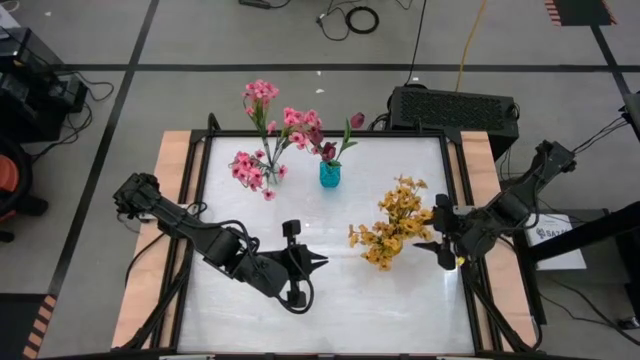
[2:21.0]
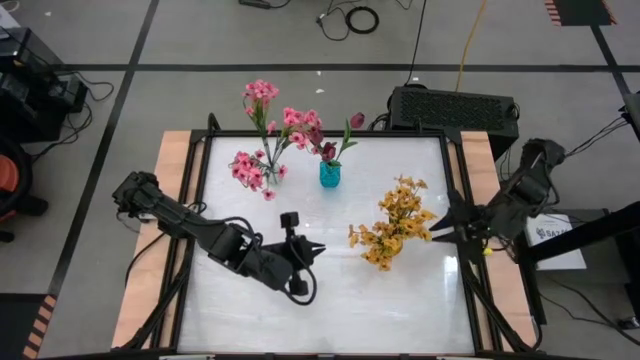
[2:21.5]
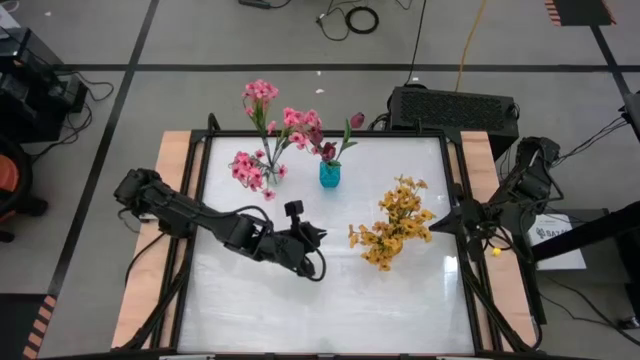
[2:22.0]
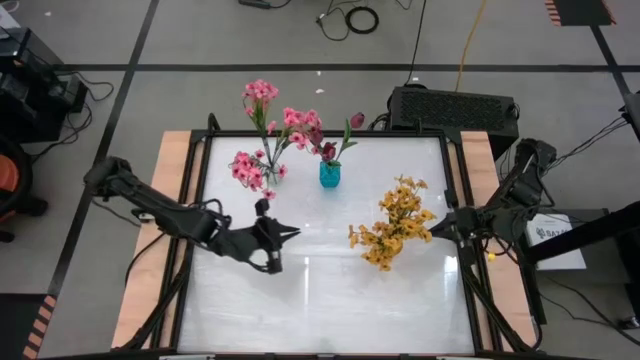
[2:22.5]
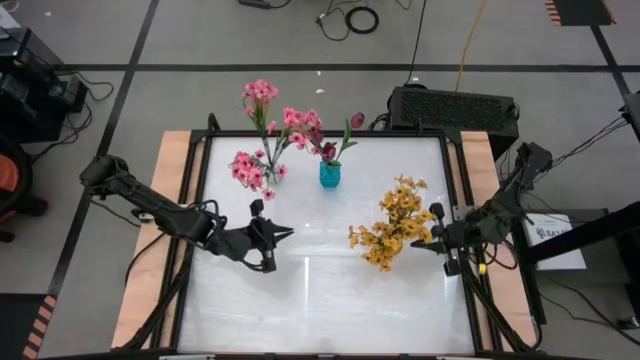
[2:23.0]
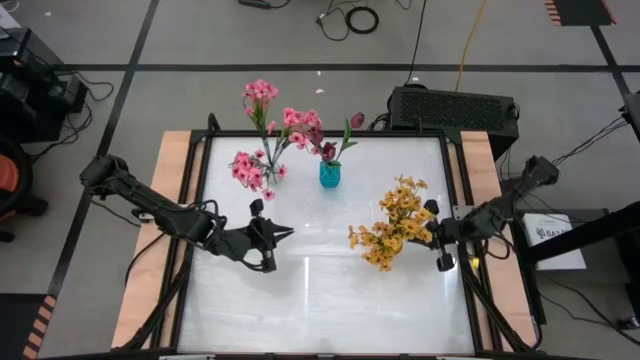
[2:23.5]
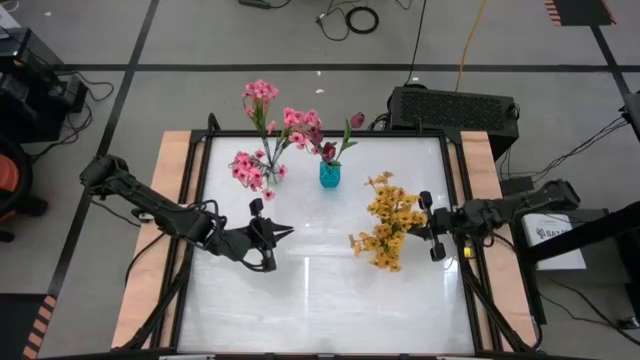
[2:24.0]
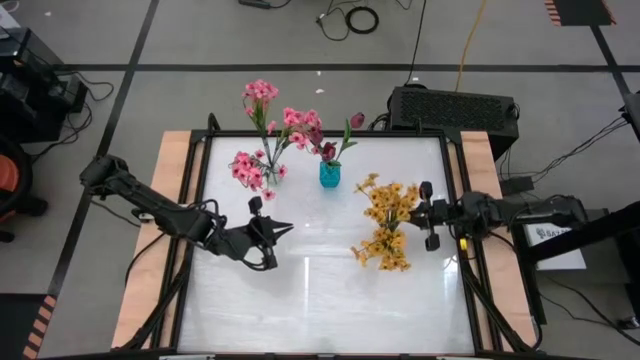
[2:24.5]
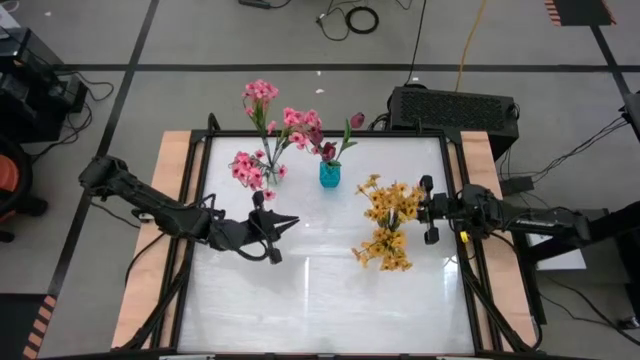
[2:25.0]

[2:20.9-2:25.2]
Task: Sort flowers into vase by color
Adjust the yellow vase

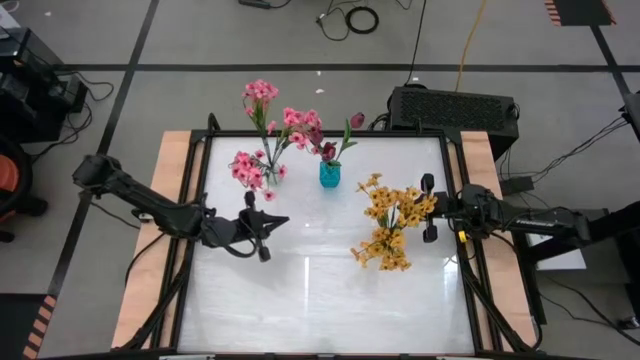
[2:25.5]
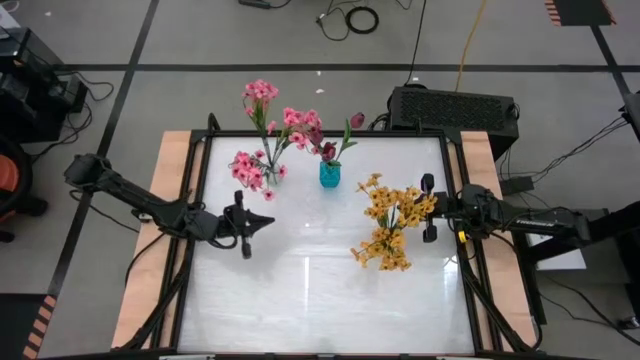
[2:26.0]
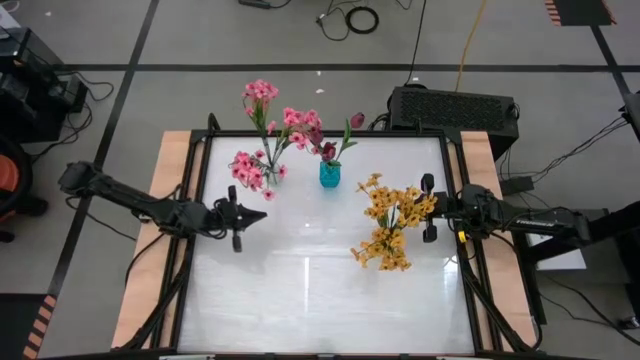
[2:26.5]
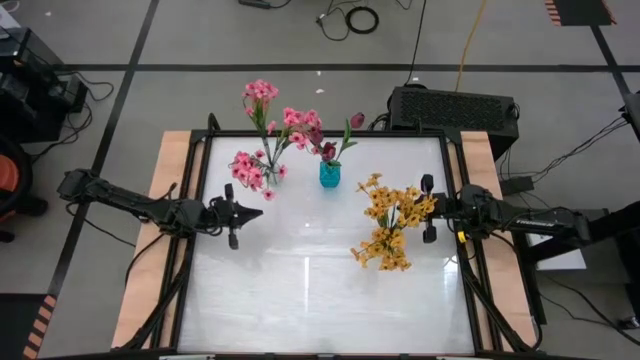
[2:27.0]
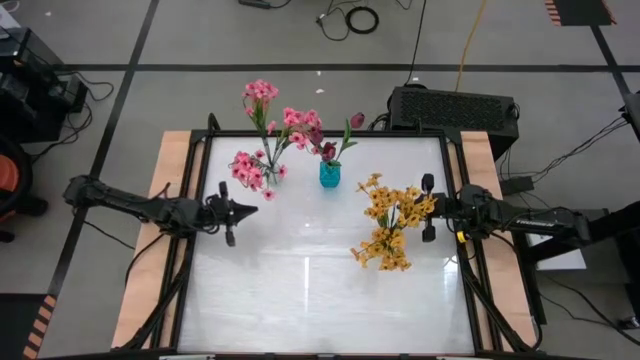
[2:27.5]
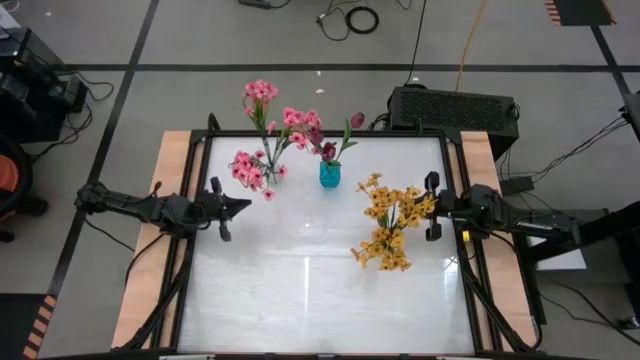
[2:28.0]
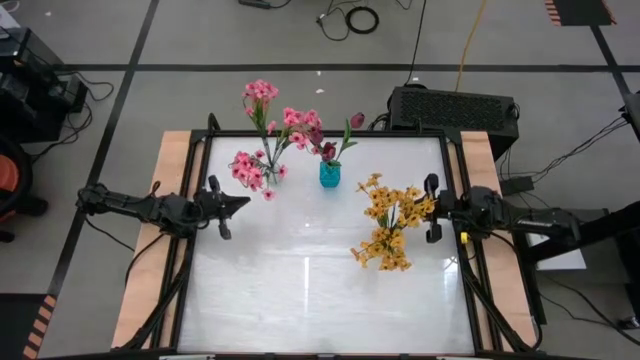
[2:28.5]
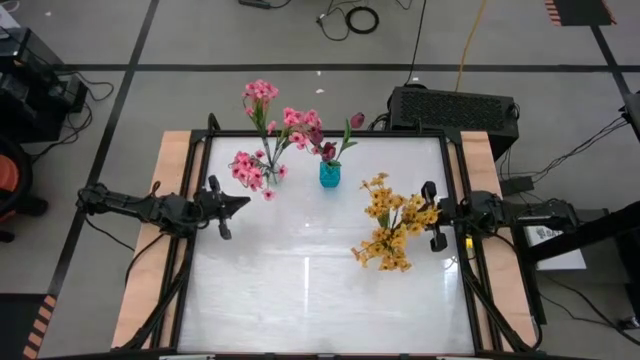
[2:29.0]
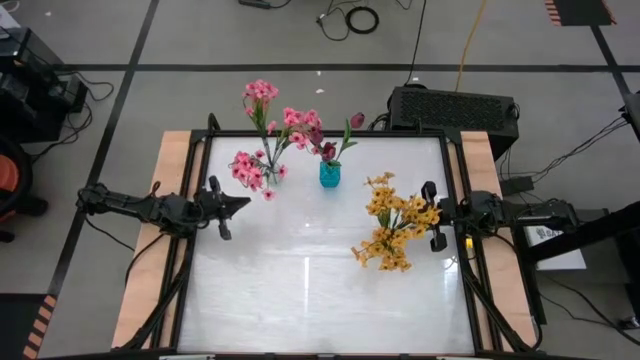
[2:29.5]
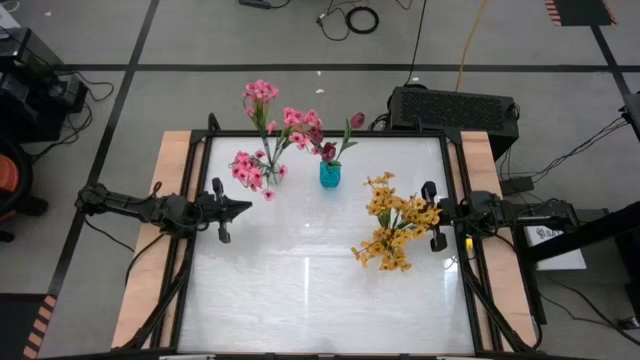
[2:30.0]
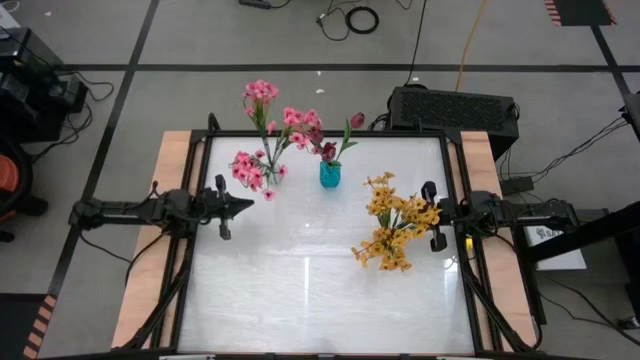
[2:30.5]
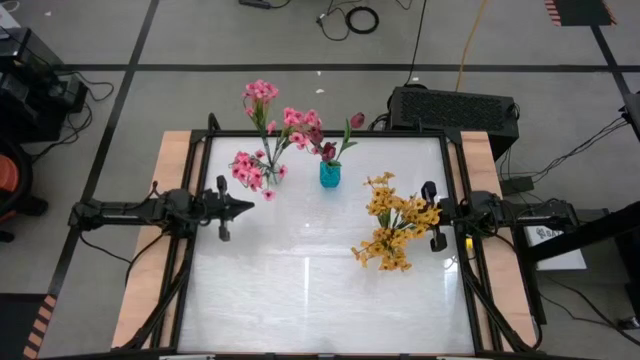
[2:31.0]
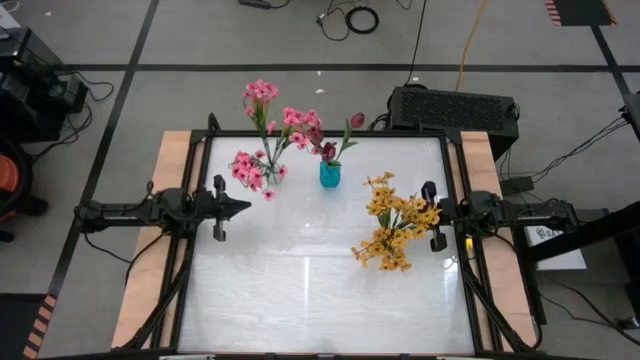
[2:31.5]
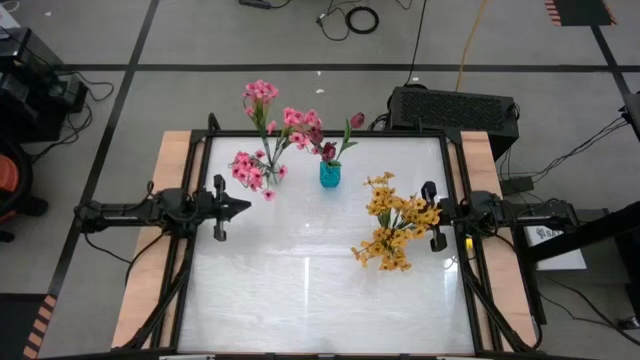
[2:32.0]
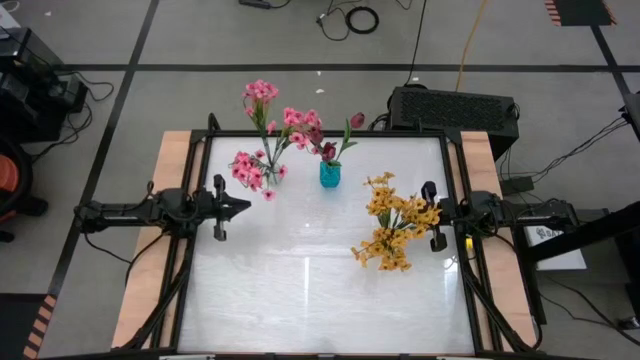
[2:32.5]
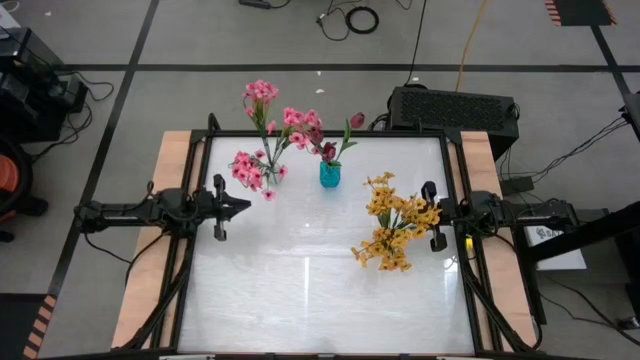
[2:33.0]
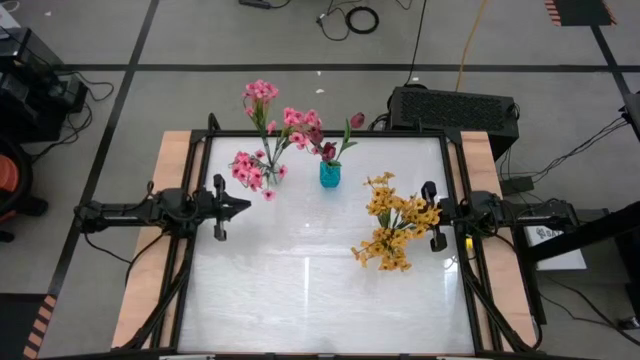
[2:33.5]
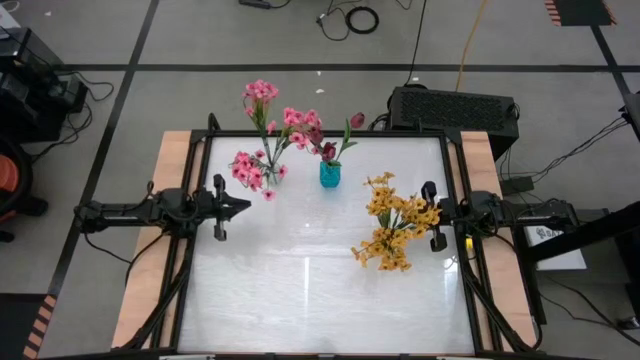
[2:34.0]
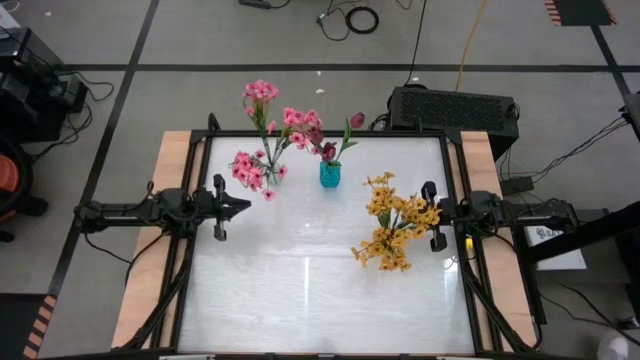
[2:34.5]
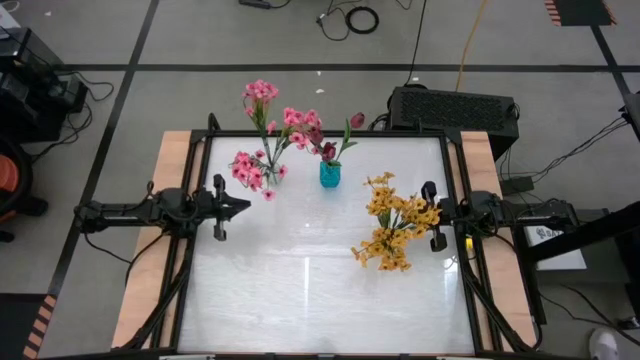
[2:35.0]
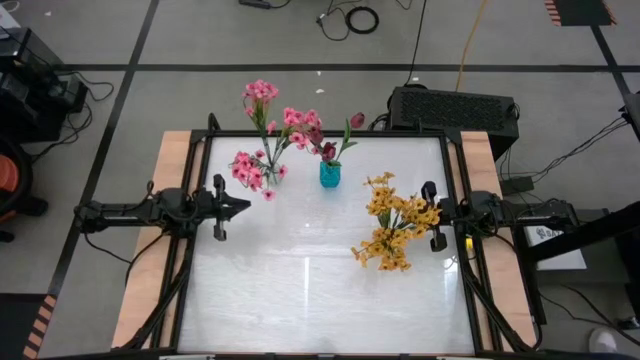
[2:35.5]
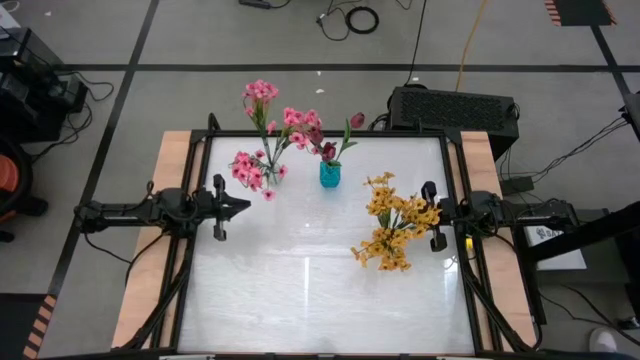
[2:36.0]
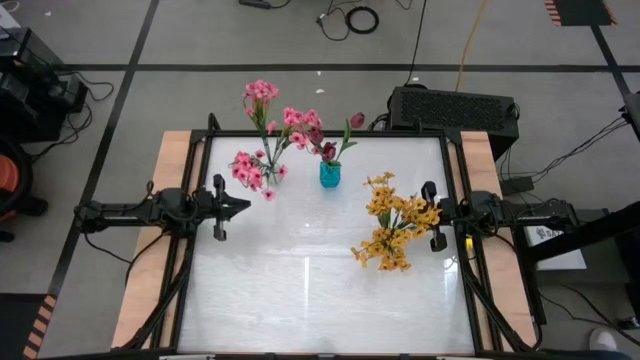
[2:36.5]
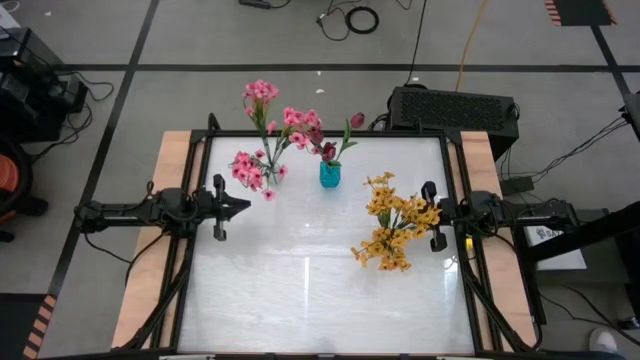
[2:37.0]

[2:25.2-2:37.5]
Return to Home Position

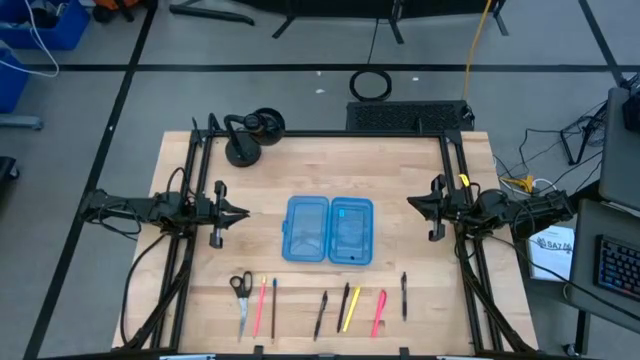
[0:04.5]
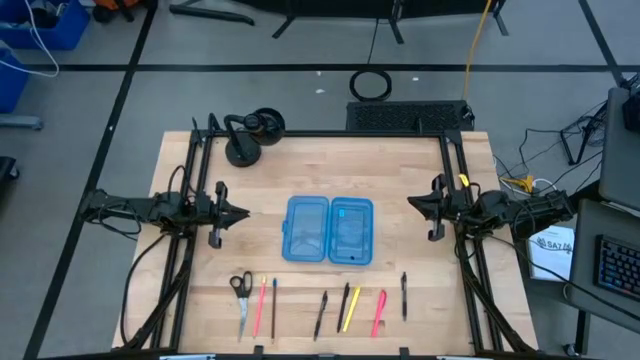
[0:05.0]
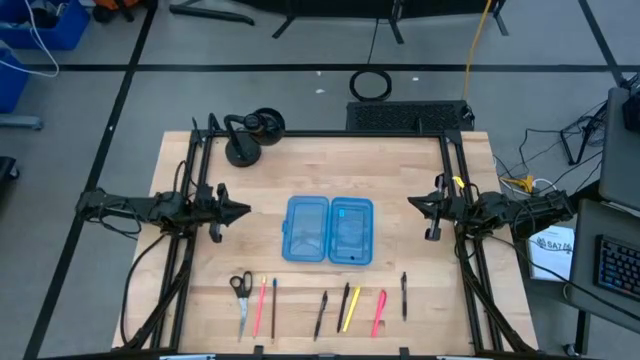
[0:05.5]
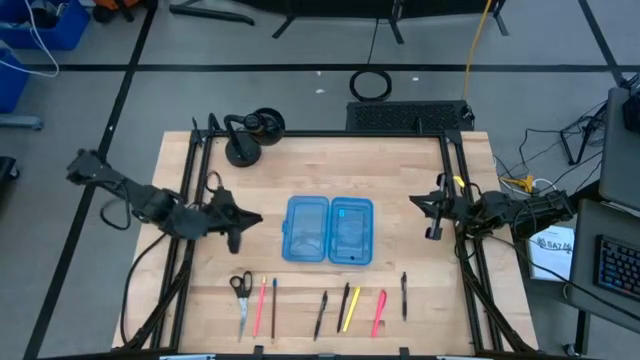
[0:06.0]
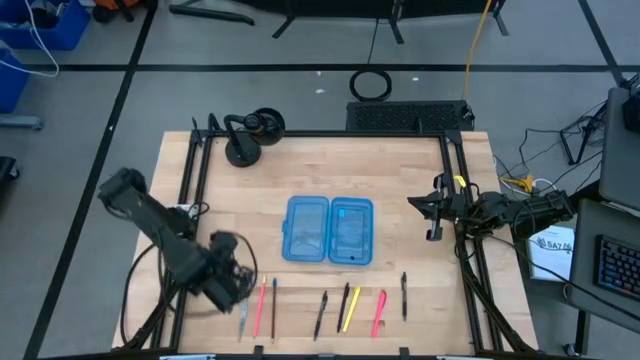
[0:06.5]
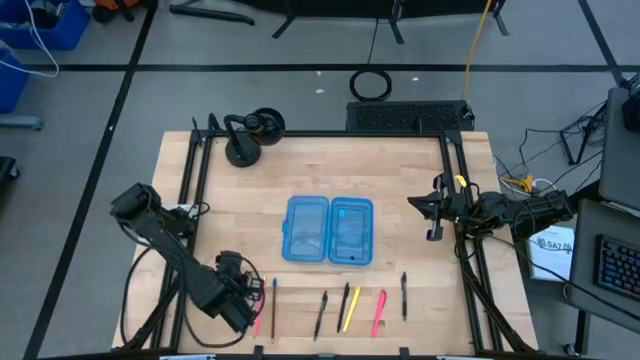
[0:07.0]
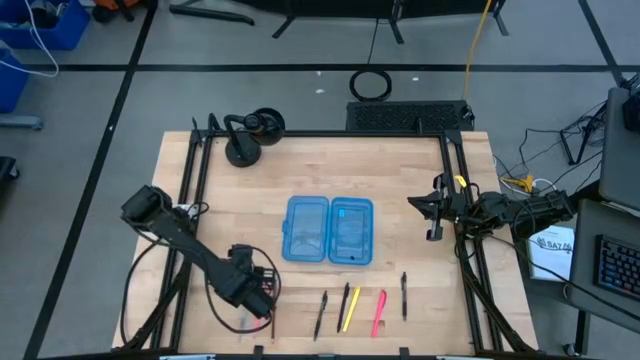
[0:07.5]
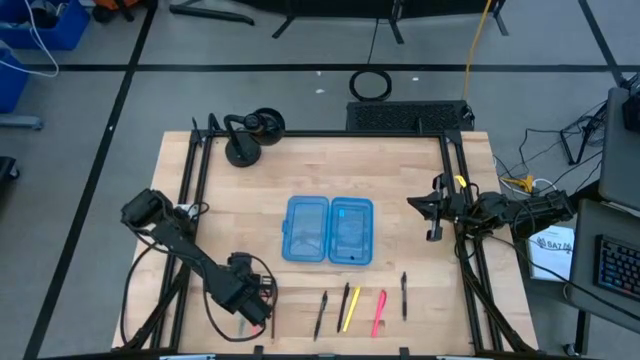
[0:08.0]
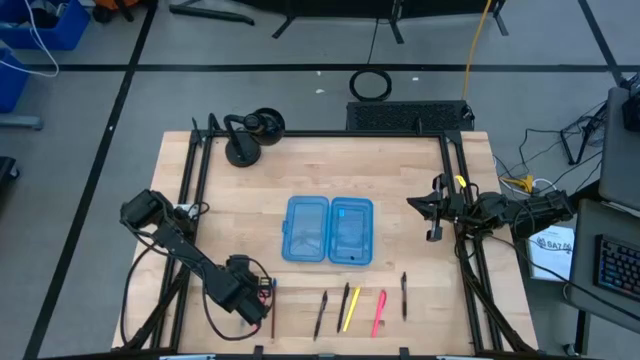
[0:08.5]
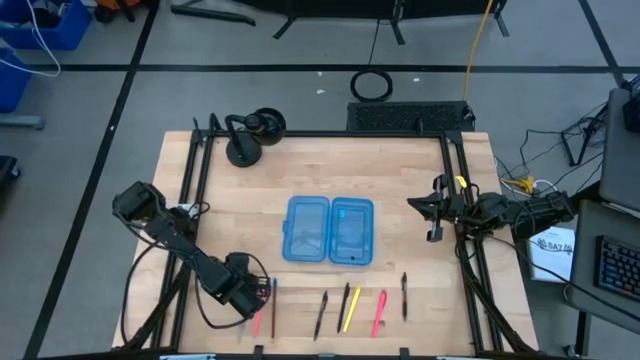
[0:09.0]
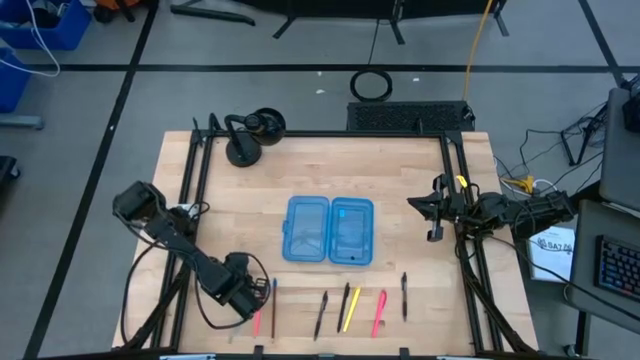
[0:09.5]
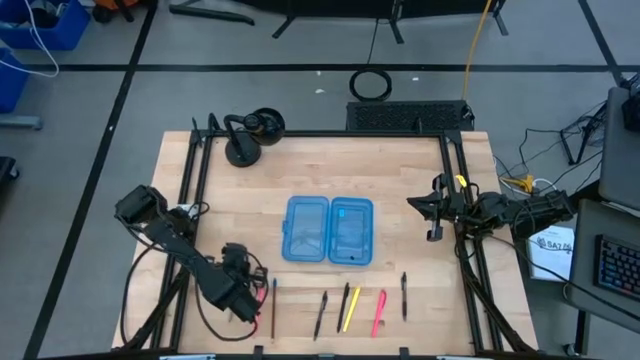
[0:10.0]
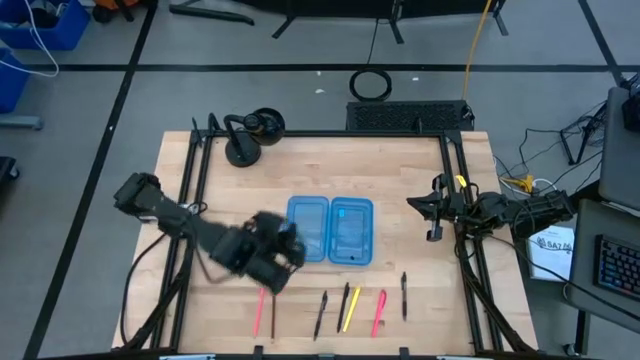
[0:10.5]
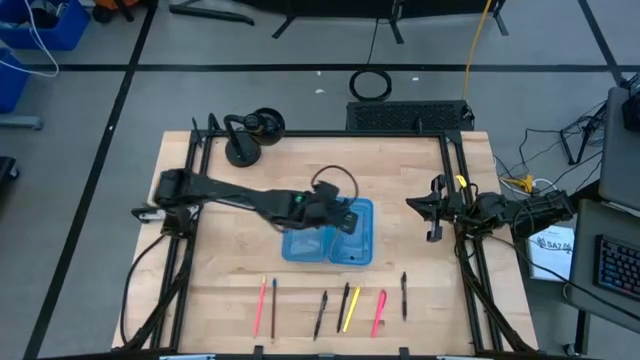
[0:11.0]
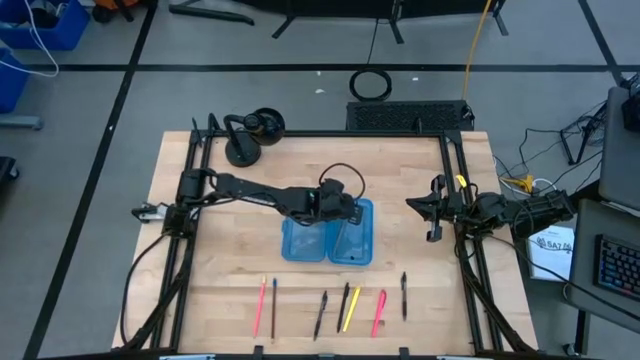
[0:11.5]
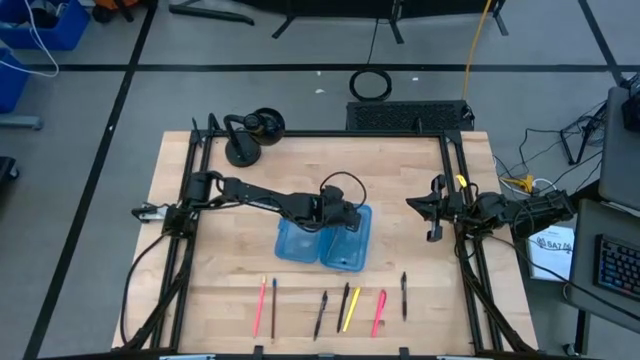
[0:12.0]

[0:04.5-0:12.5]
Task: Pick & place school supplies into a supply box
Put the black scissors into the blue supply box
